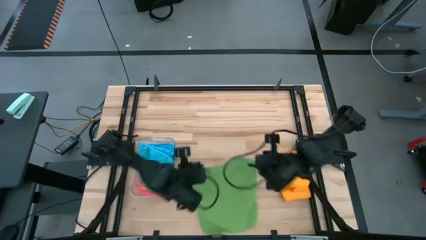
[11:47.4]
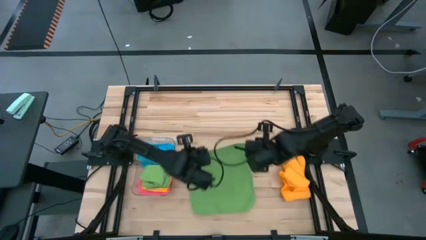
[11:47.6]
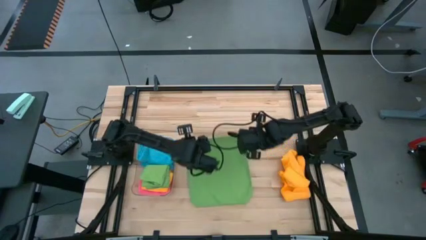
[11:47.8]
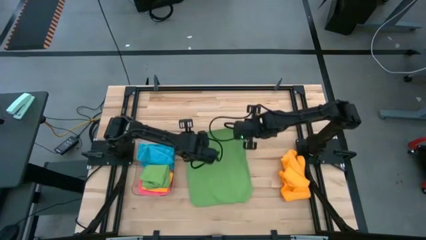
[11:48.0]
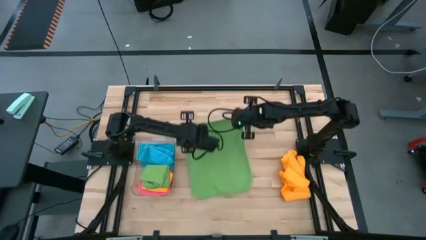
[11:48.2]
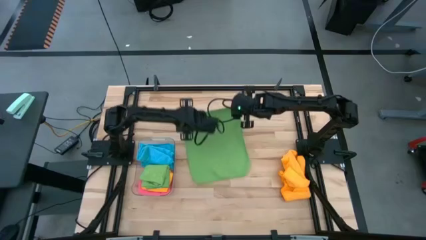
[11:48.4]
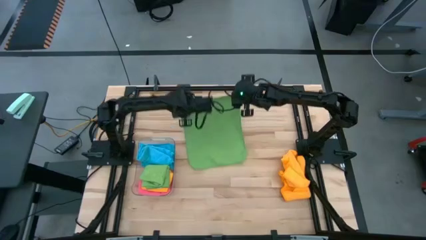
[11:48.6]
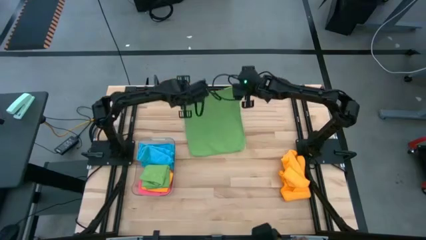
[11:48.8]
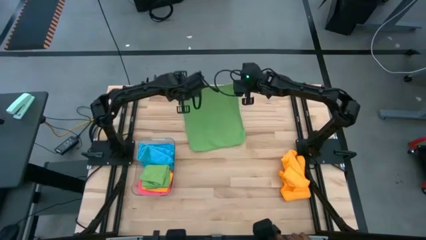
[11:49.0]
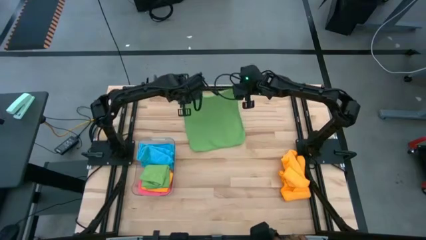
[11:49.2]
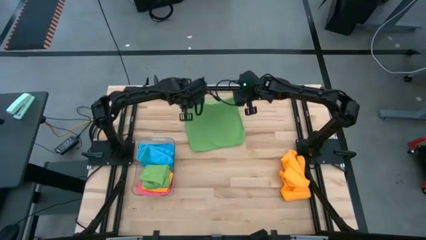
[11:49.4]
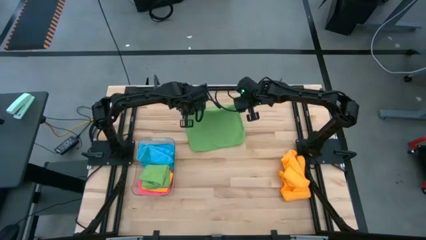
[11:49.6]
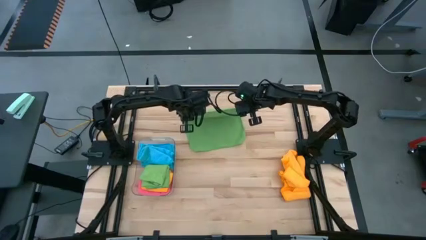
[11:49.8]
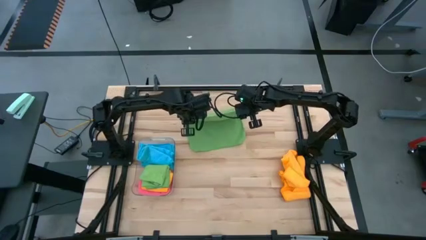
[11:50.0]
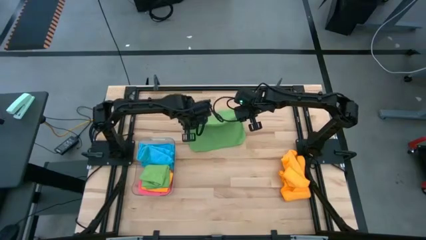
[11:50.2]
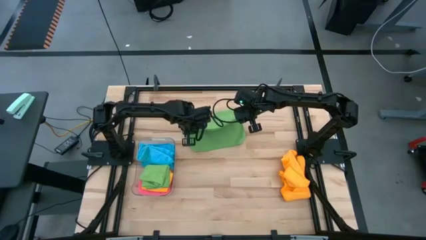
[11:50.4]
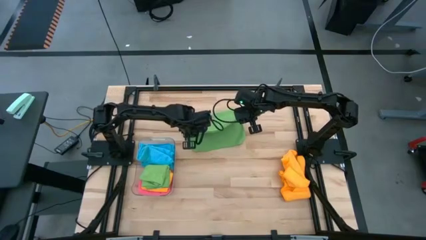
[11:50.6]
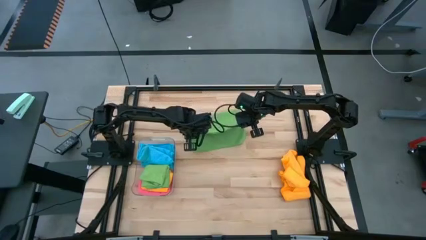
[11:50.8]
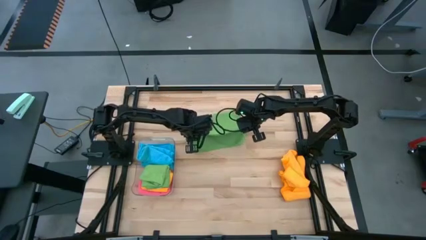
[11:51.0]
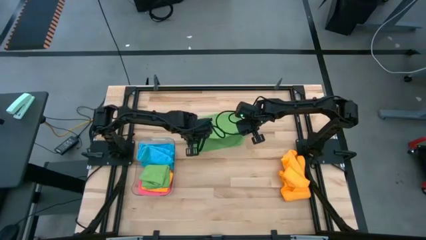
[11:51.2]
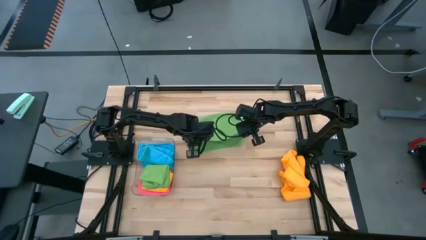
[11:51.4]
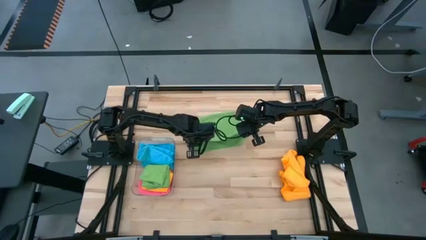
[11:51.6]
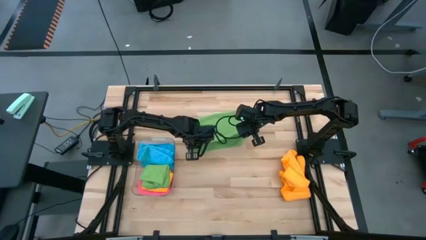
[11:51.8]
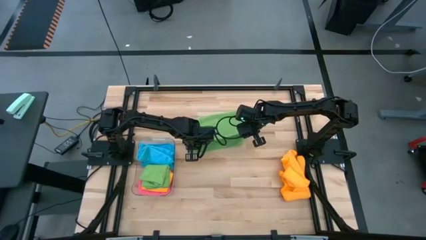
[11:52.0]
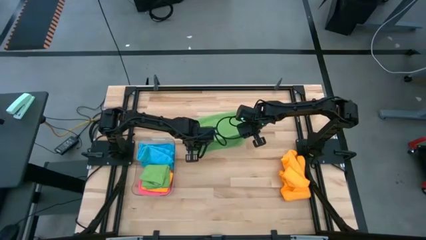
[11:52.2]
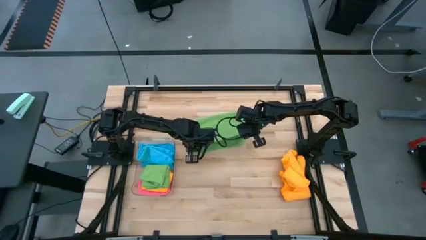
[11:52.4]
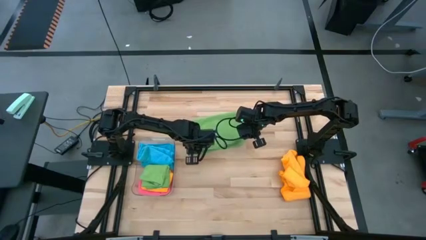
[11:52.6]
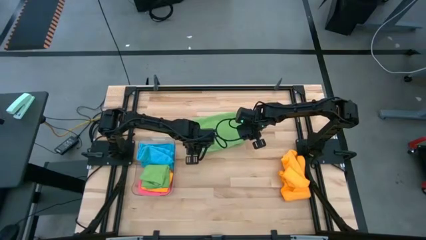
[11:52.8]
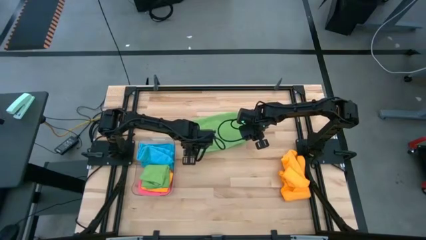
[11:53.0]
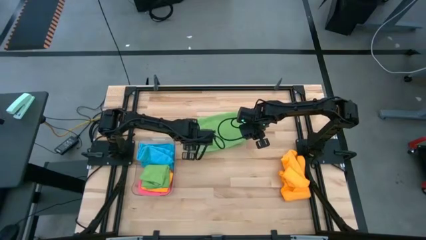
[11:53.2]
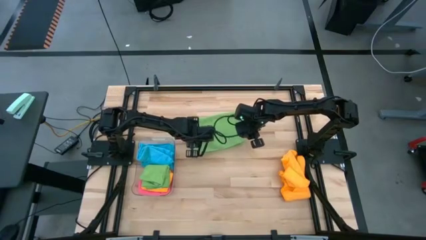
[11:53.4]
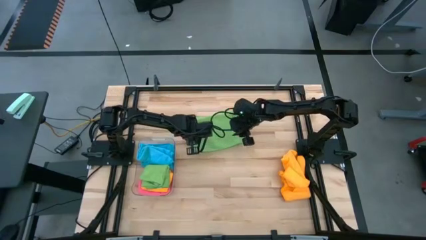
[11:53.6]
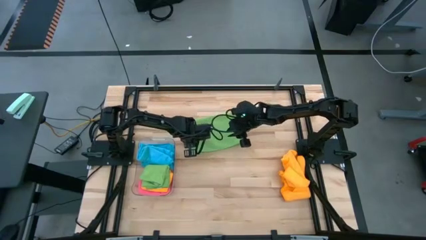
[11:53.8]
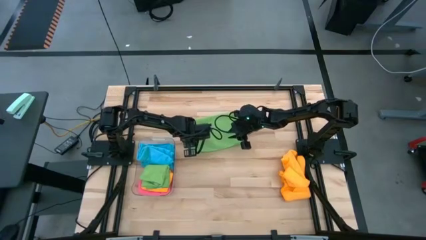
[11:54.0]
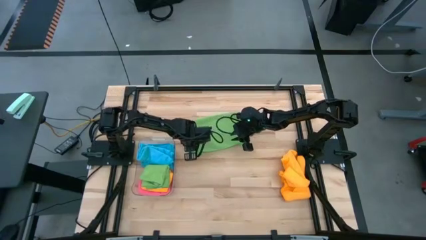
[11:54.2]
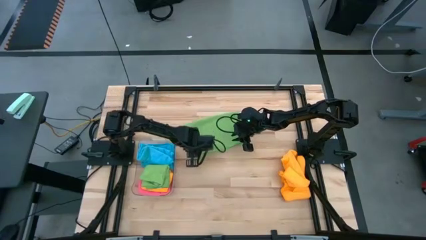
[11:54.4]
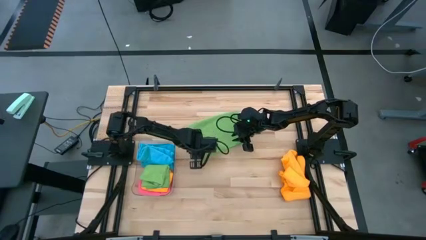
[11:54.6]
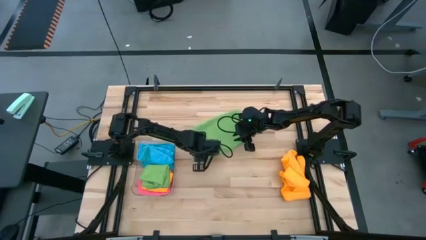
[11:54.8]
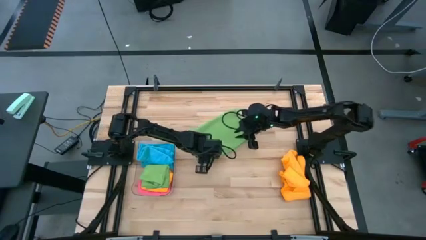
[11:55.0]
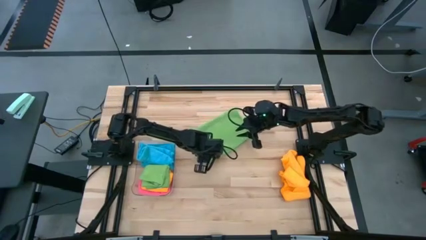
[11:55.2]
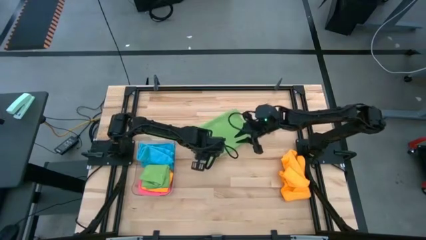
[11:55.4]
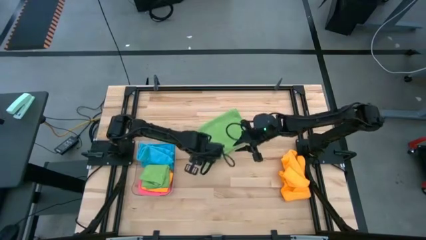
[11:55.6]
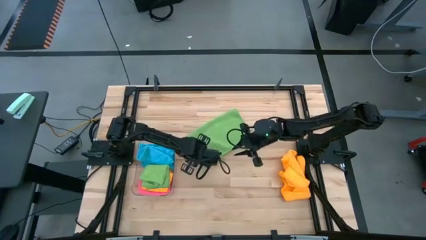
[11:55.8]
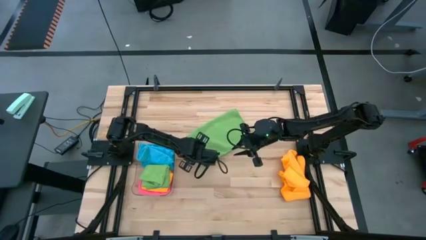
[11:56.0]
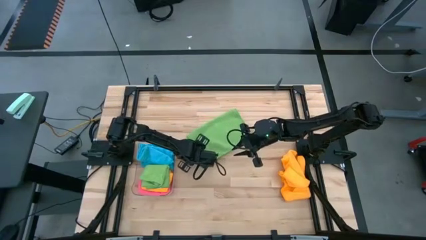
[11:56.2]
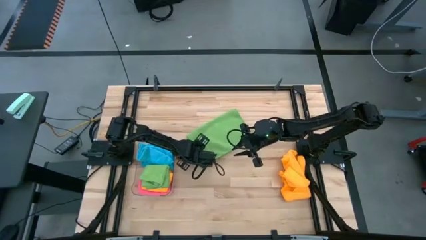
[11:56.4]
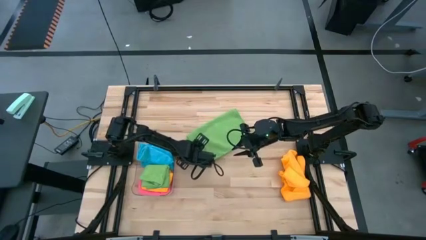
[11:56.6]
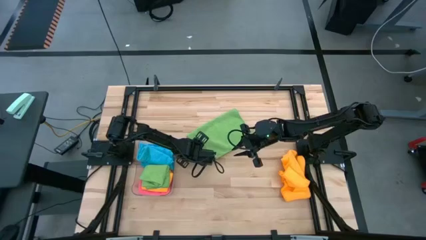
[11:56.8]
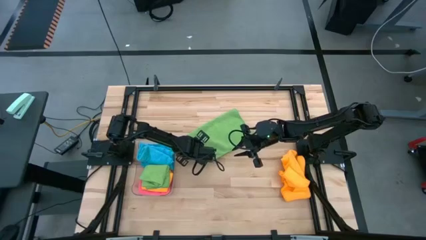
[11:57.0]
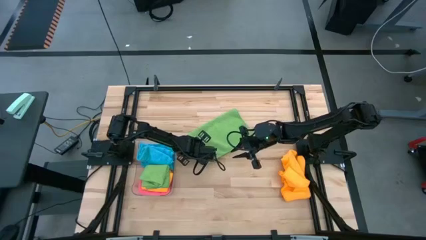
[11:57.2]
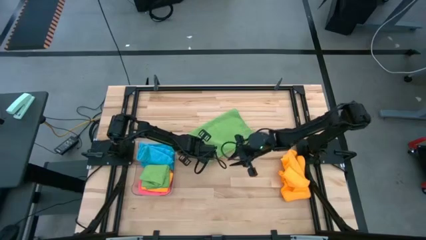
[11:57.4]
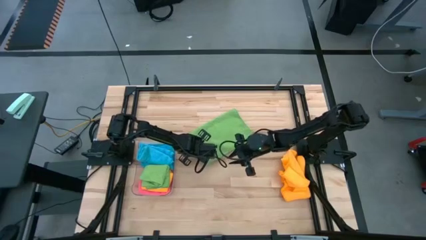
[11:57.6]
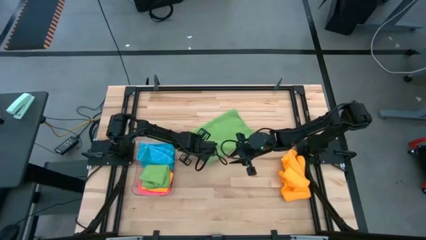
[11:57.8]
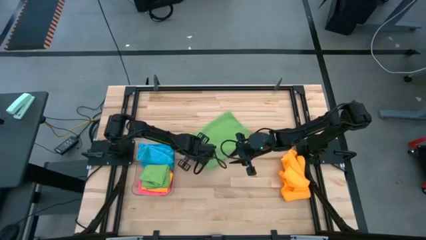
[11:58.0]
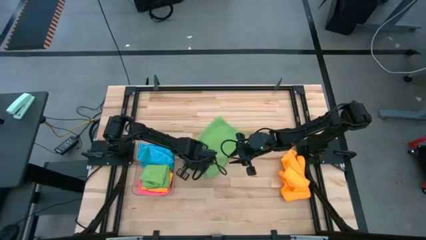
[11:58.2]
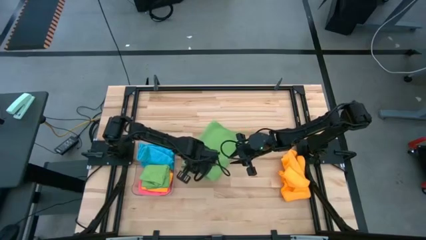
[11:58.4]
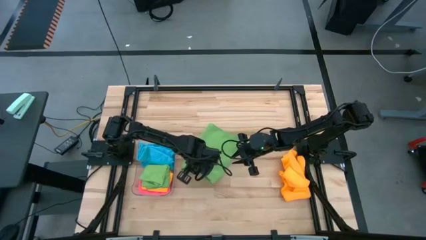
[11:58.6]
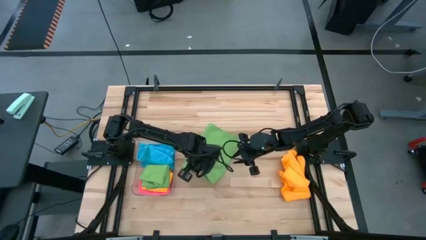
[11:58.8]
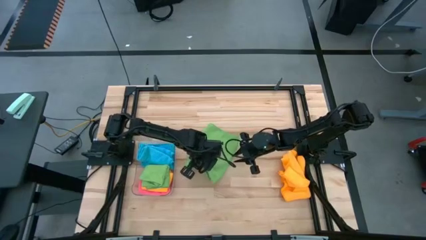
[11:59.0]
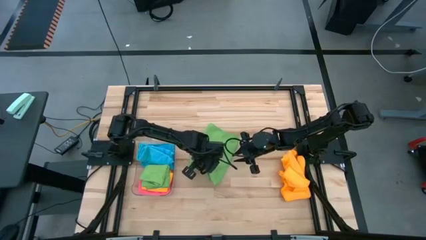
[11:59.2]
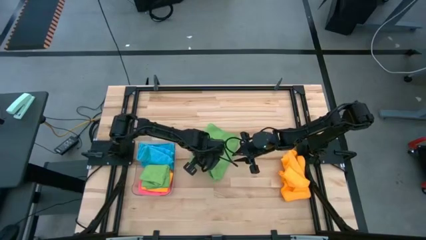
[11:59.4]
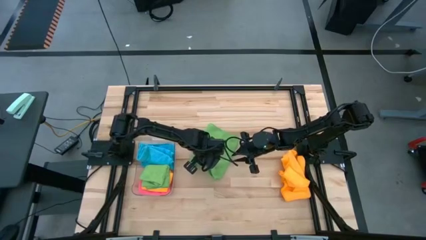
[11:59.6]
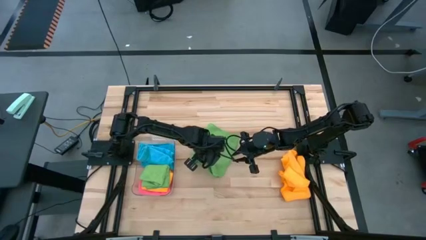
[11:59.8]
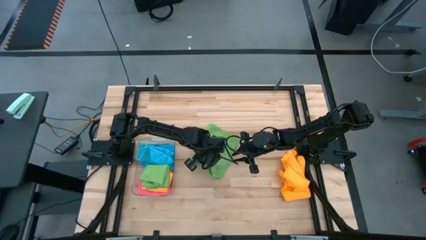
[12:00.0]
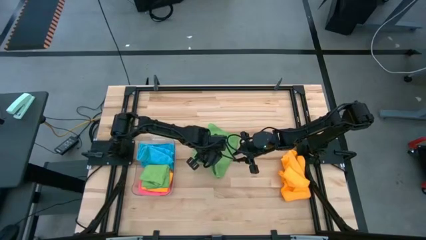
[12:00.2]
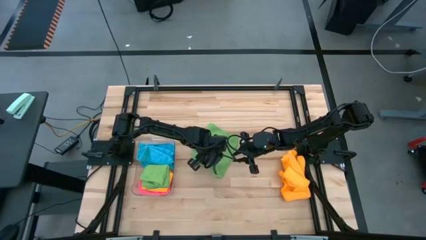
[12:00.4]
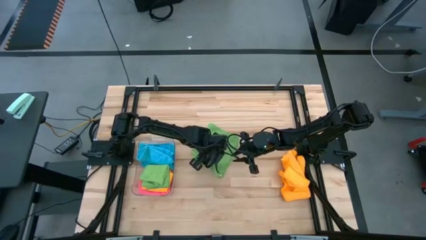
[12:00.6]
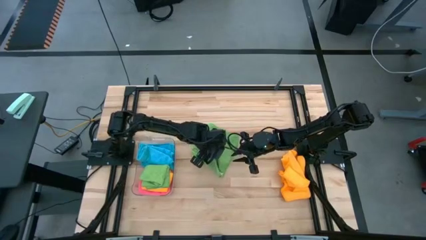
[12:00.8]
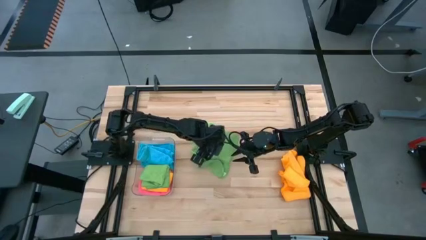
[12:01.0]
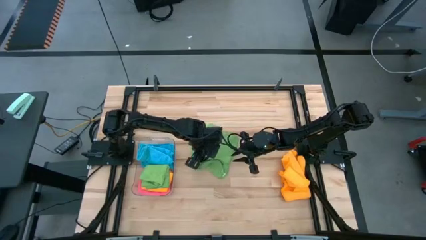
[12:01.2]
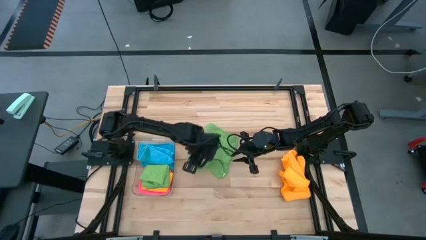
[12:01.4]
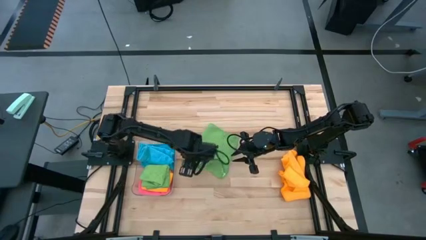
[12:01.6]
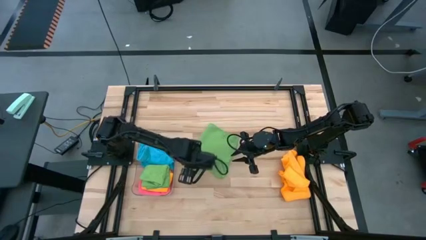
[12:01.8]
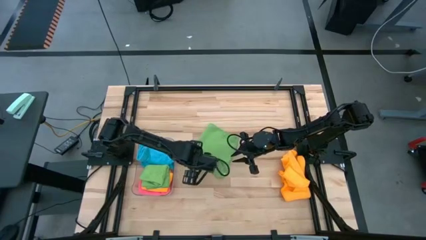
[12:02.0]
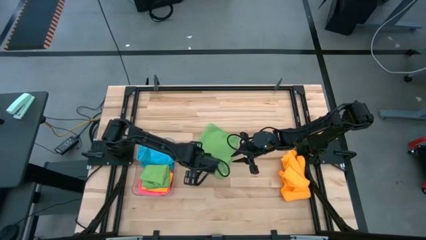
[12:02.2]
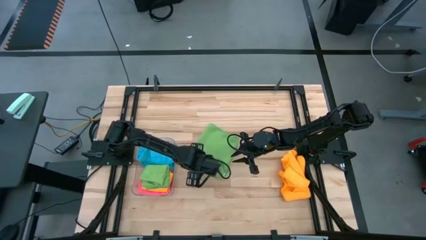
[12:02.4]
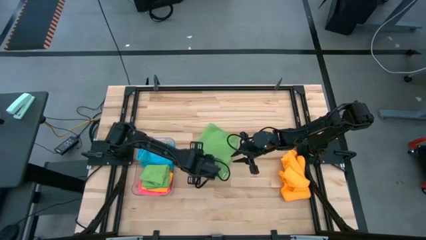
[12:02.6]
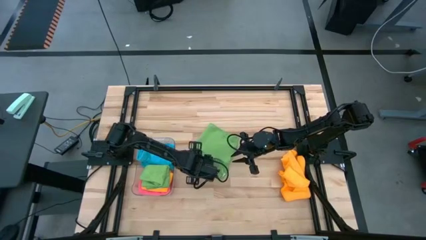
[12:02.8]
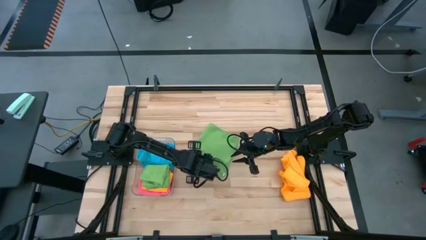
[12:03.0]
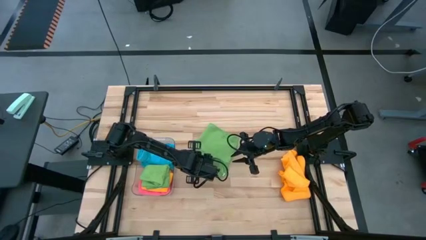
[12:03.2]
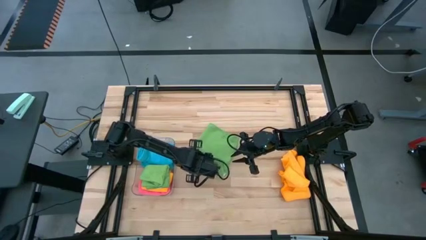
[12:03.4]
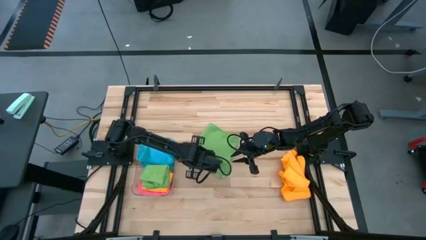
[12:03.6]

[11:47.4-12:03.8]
Task: Fold microfiber towels
Fold the green microfiber cloth
